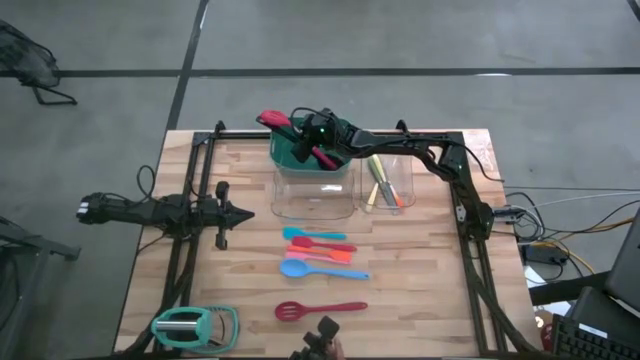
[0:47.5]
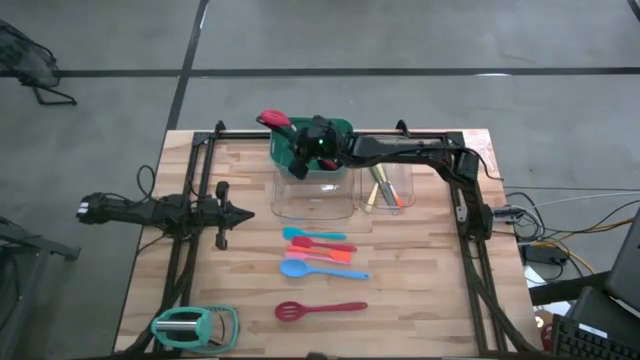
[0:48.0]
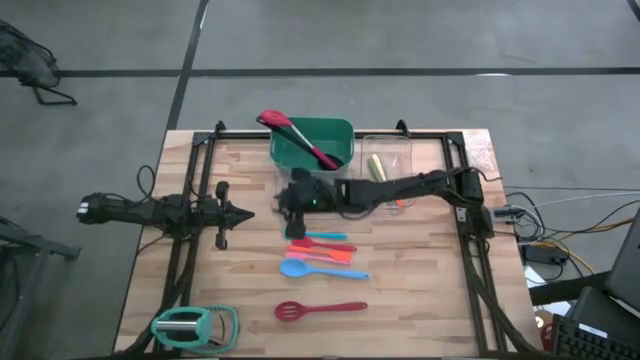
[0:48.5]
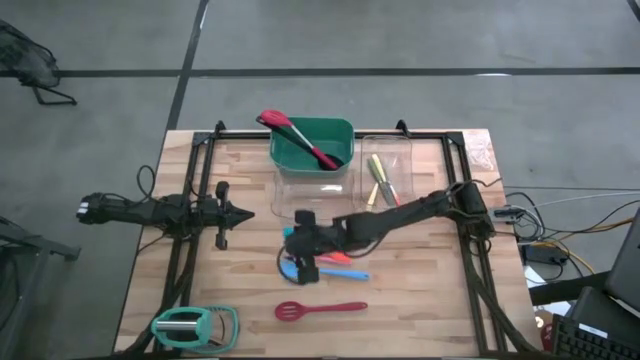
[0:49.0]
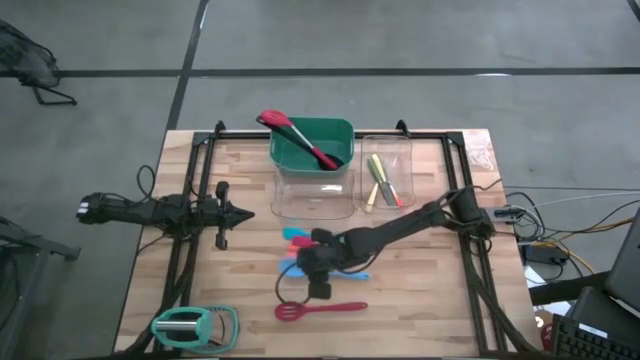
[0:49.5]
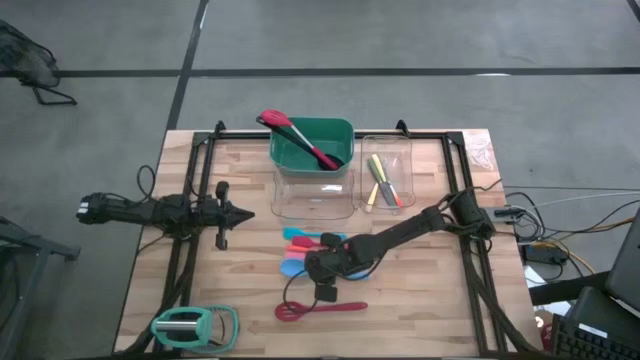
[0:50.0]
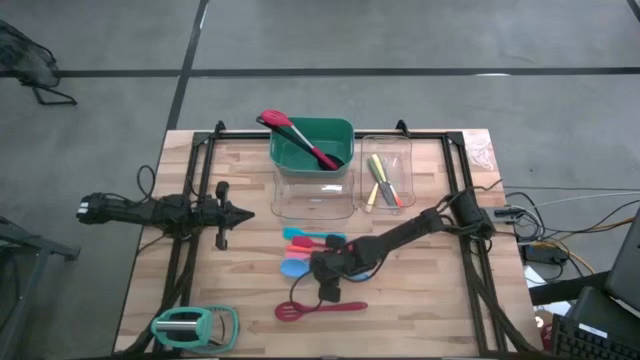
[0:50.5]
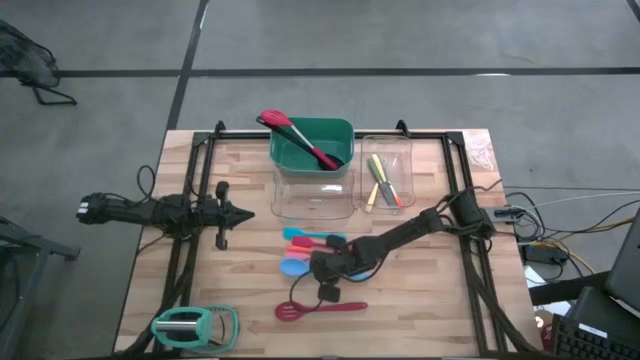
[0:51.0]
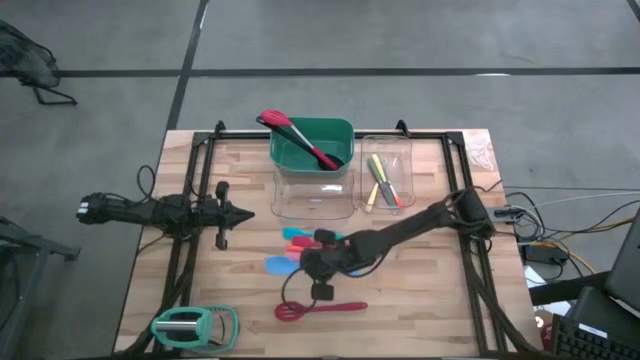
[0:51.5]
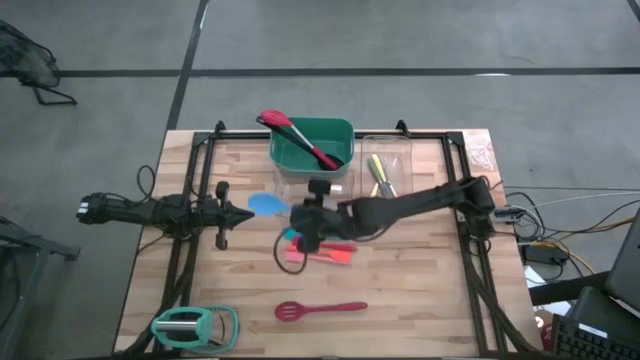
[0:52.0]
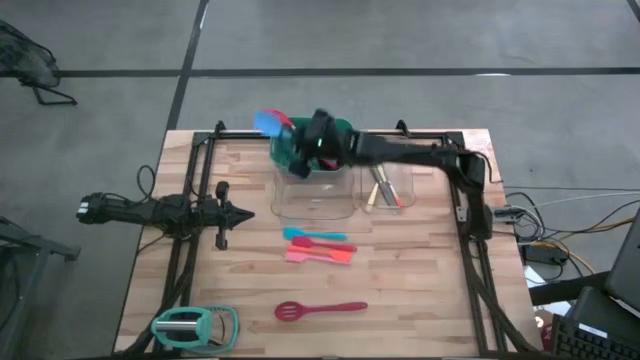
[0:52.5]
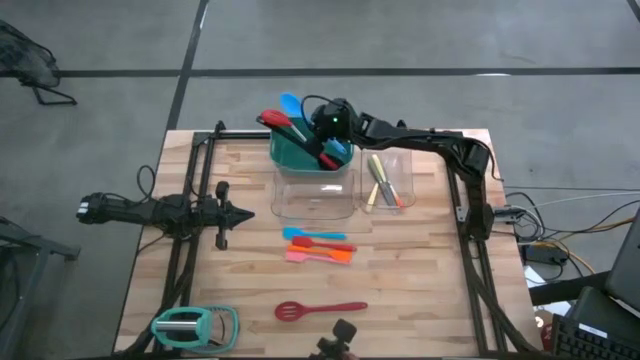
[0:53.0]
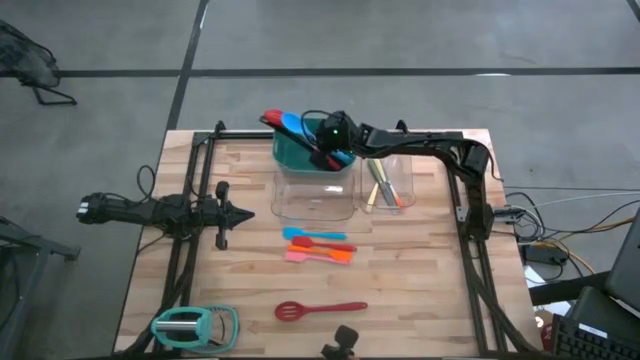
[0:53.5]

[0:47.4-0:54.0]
Task: Pick & Place Kitchen Items
Put the blue spoon into the green bin

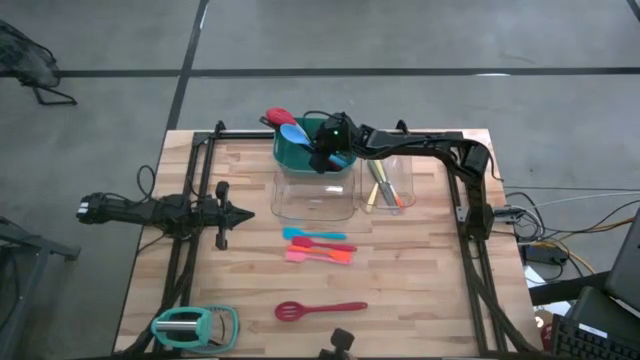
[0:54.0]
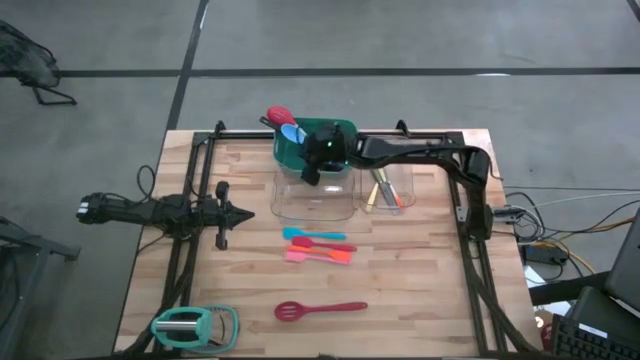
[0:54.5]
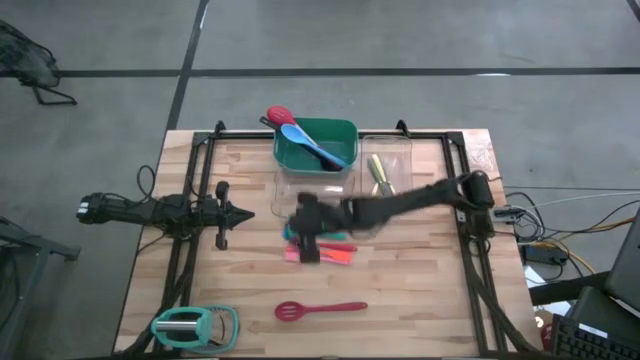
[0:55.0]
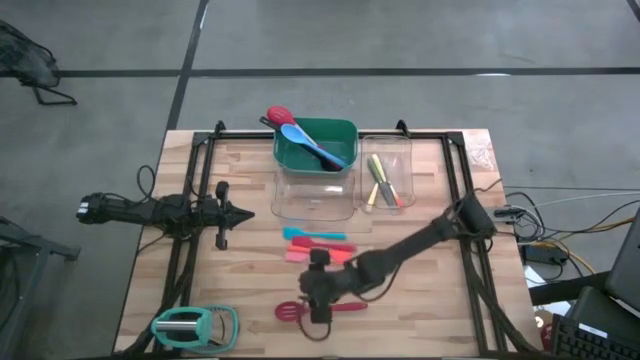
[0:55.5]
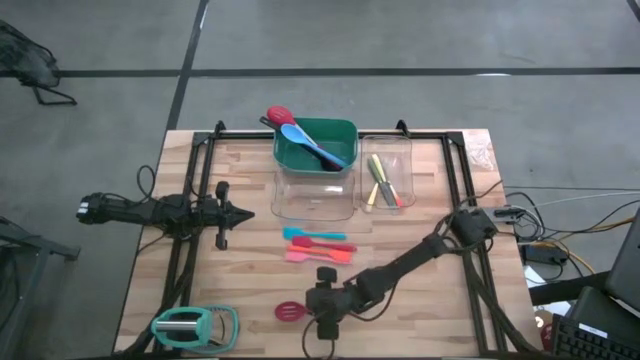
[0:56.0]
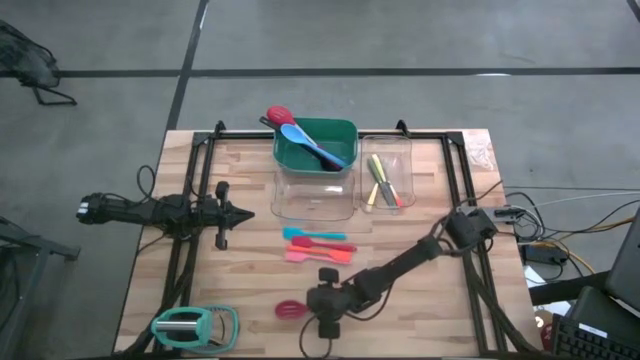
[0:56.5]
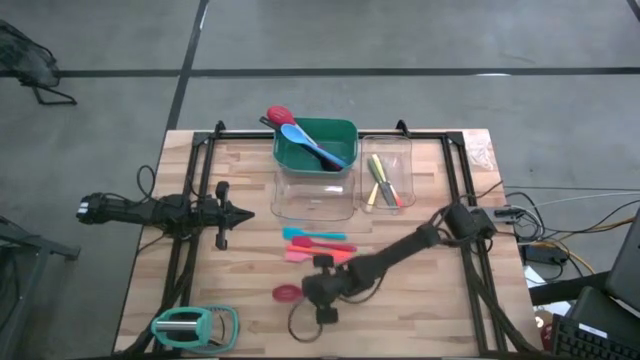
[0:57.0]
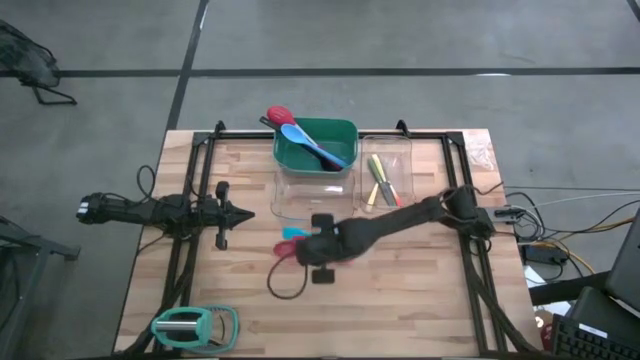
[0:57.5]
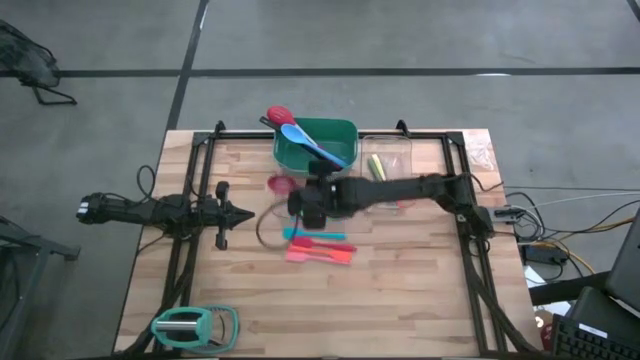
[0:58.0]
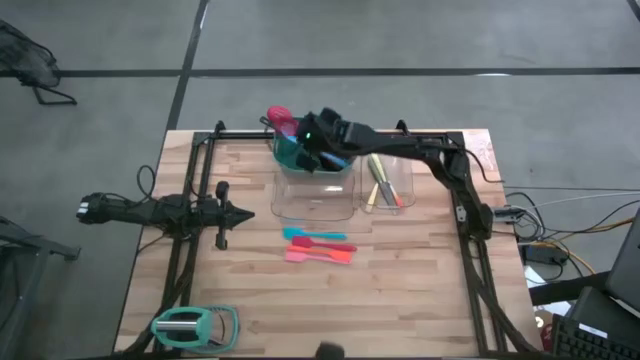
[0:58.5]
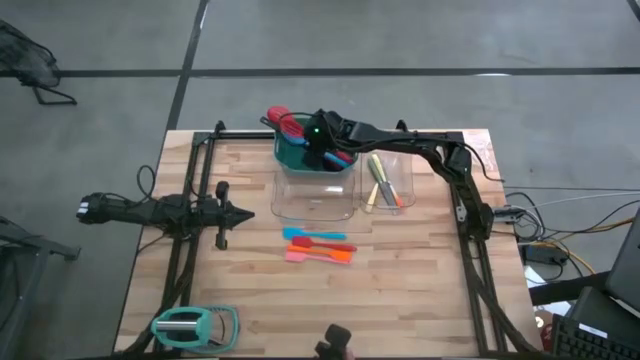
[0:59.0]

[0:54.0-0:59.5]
Put the red slotted spoon into the green bin

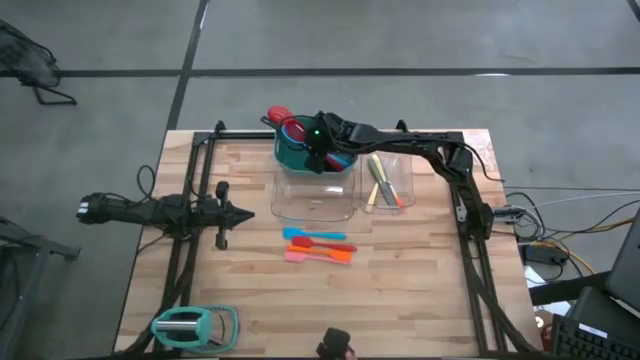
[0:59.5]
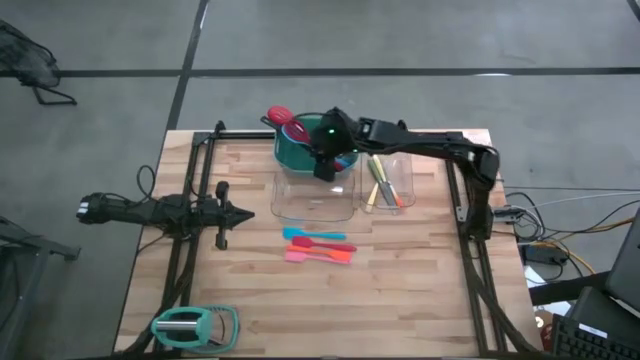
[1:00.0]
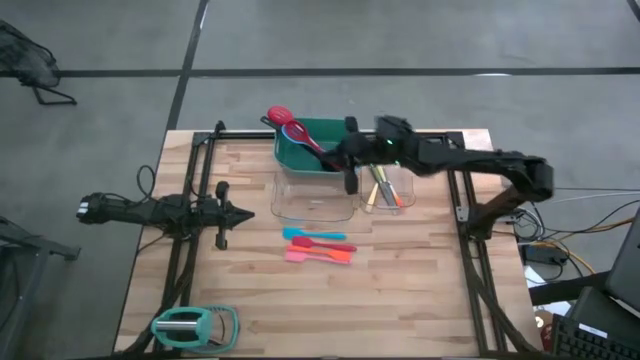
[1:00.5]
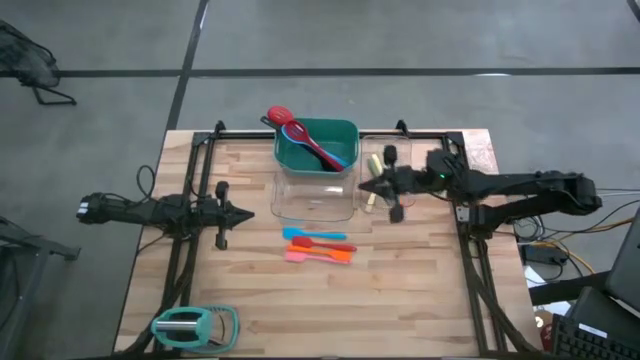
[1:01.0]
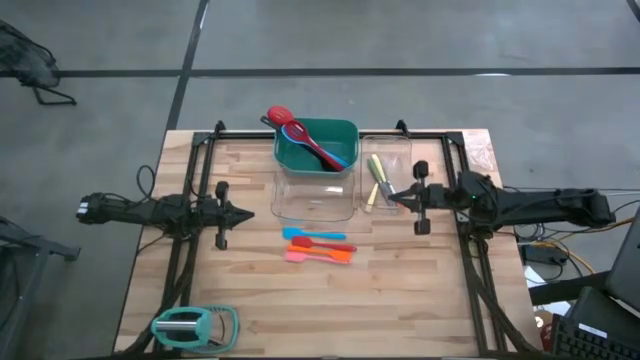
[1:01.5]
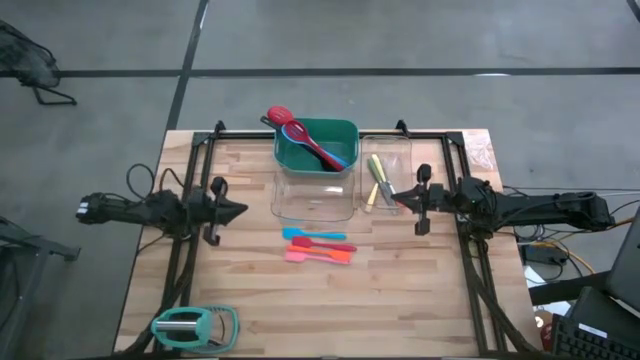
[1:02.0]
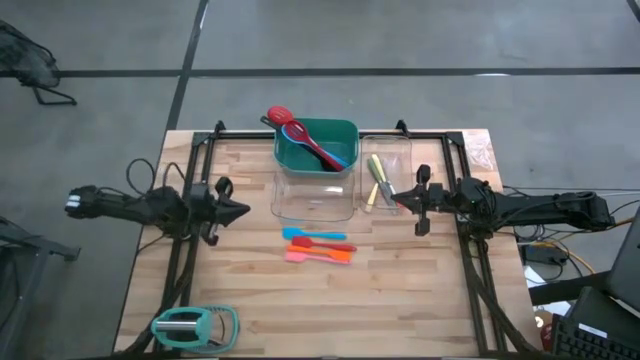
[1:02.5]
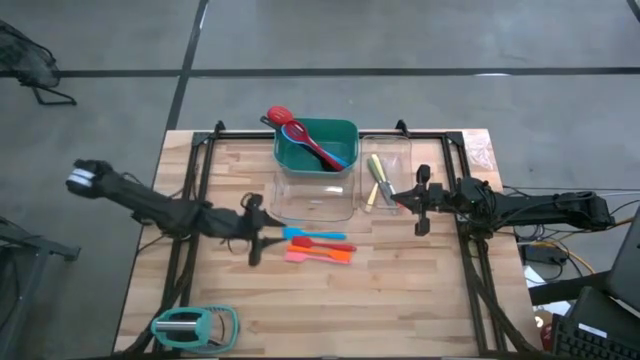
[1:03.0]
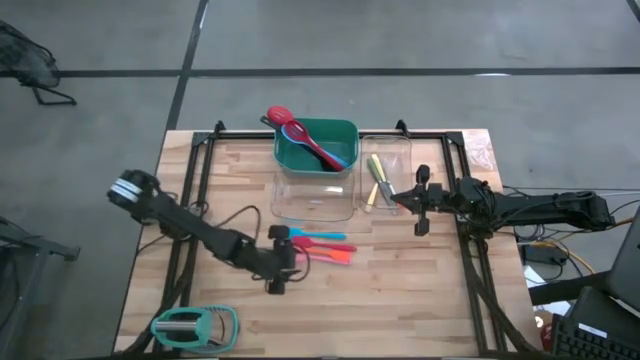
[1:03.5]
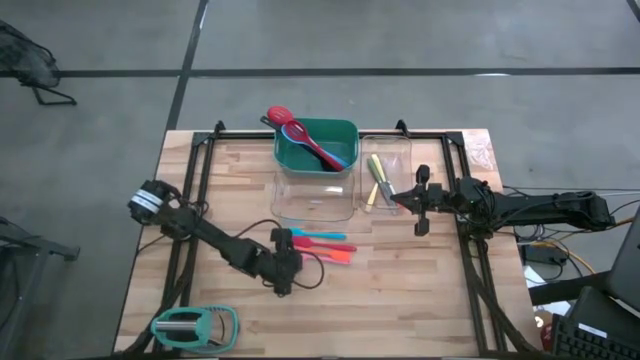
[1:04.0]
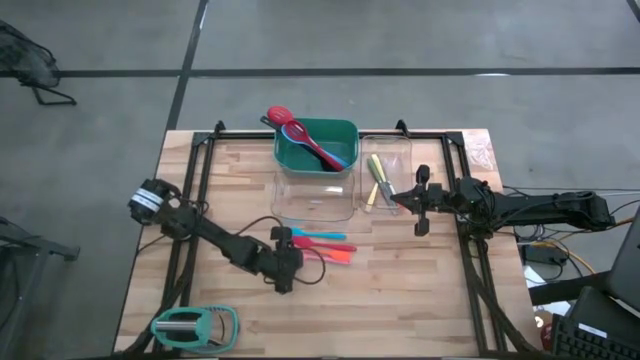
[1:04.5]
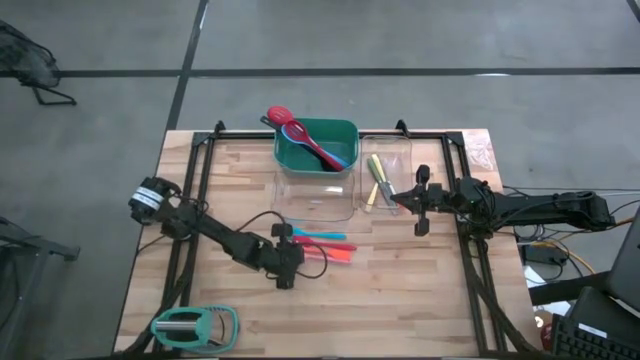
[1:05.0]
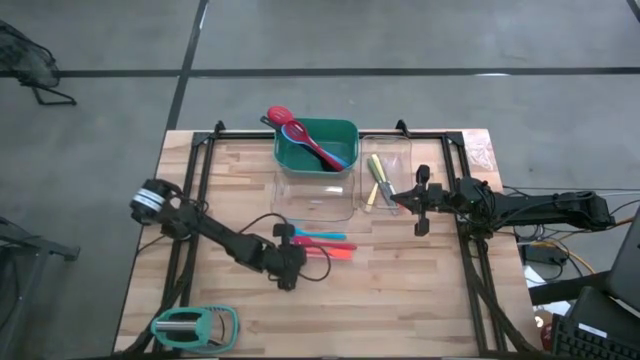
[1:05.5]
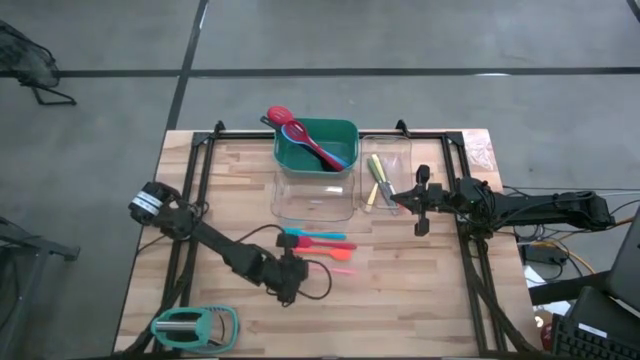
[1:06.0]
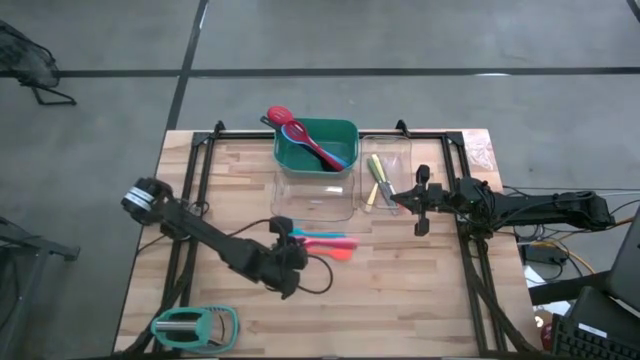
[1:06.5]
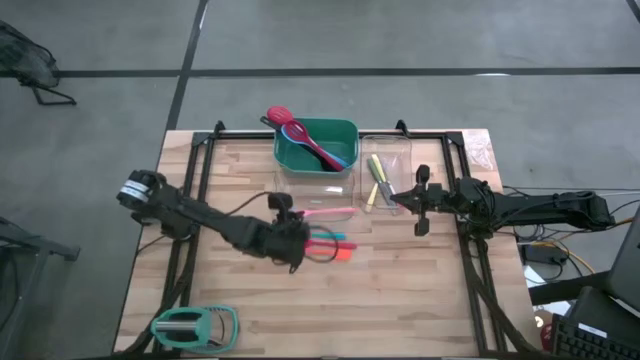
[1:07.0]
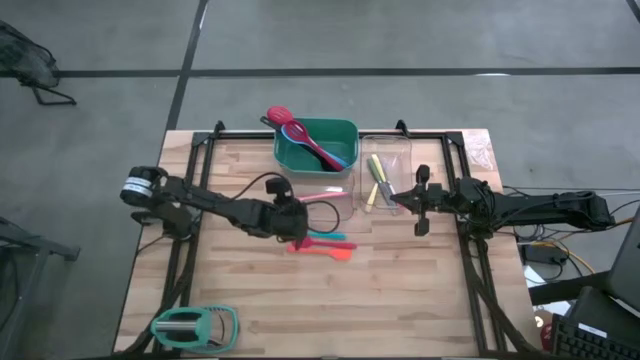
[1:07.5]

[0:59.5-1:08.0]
Put the pink spatula into the left transparent bin

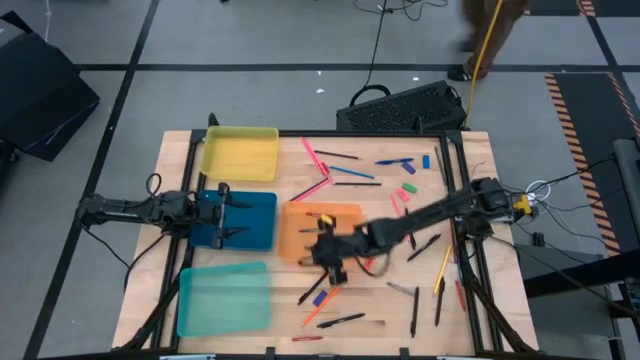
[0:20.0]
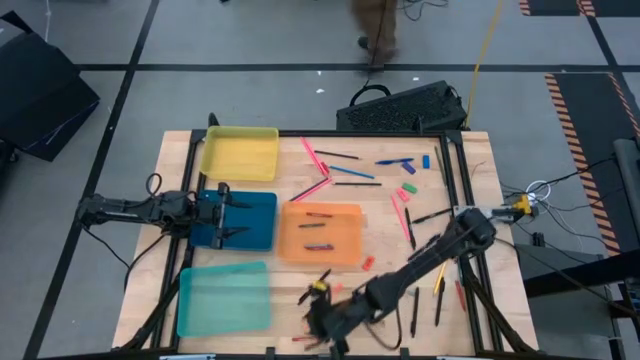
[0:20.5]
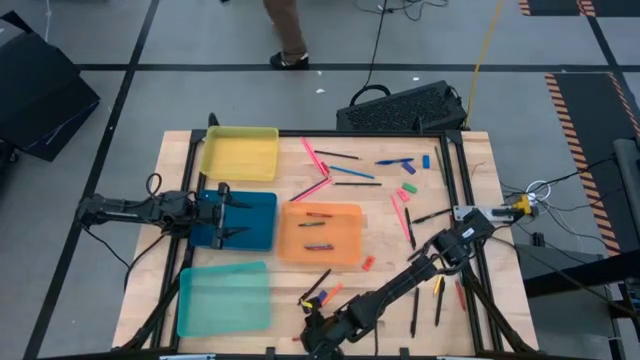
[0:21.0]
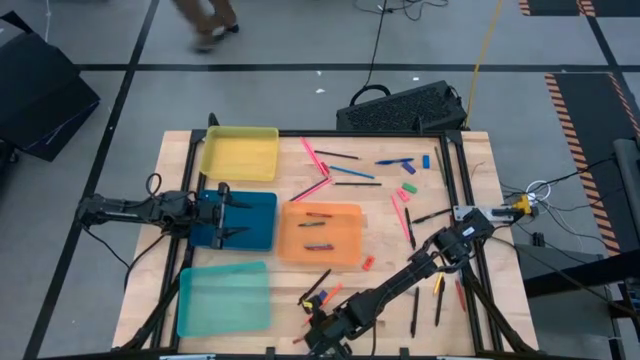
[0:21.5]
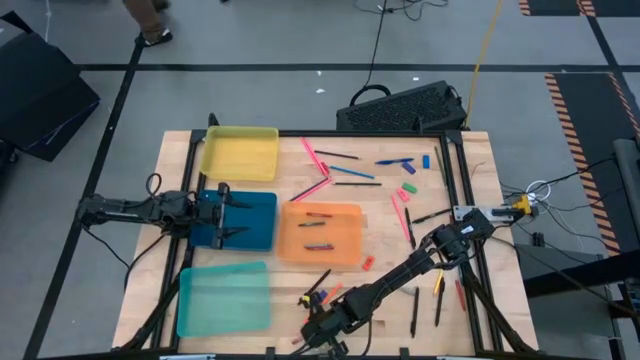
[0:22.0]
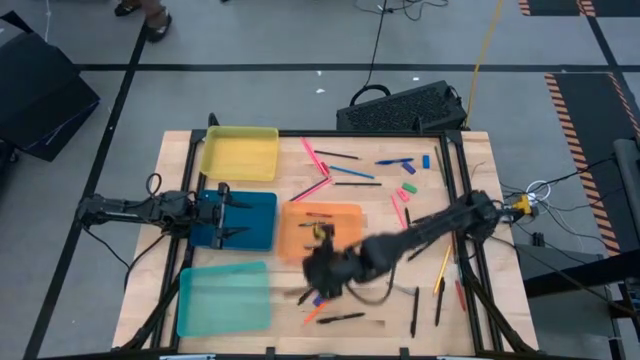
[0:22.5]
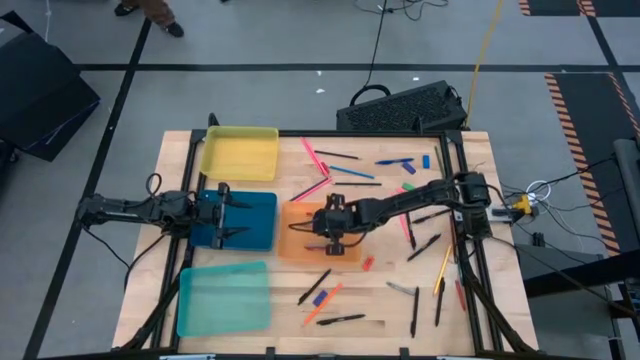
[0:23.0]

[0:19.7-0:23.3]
Task: Sort crayons/erasers/pens/pencils in bins
Put the red crayon into the orange bin
